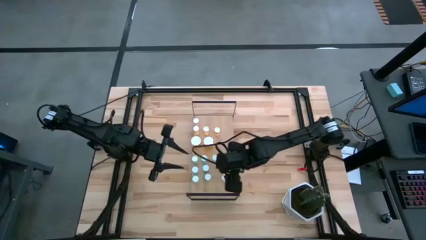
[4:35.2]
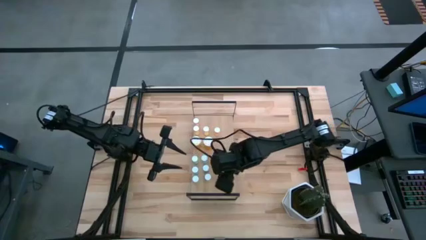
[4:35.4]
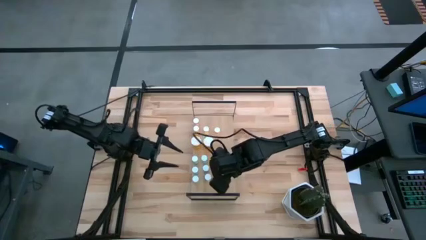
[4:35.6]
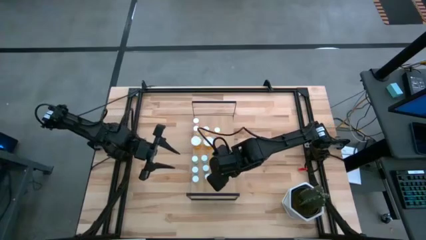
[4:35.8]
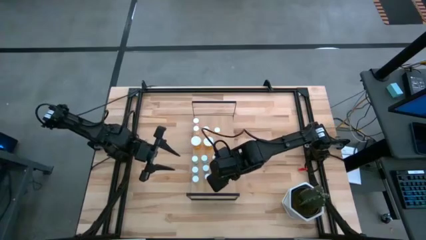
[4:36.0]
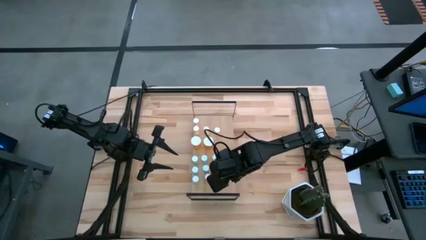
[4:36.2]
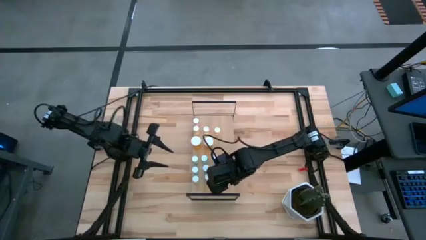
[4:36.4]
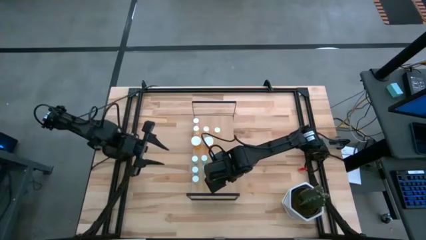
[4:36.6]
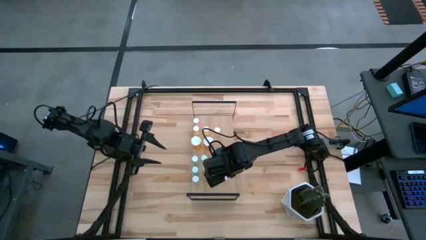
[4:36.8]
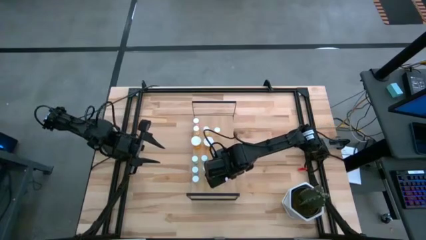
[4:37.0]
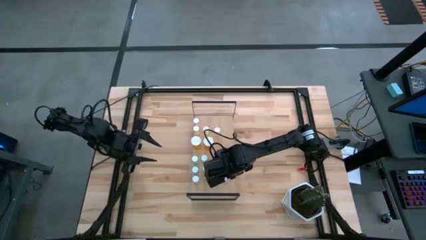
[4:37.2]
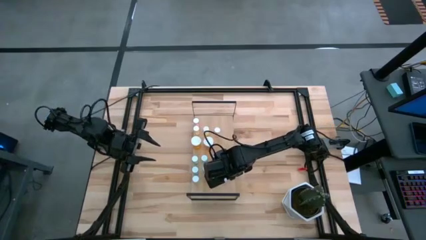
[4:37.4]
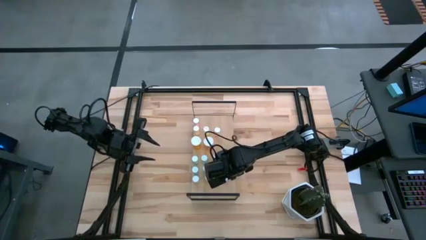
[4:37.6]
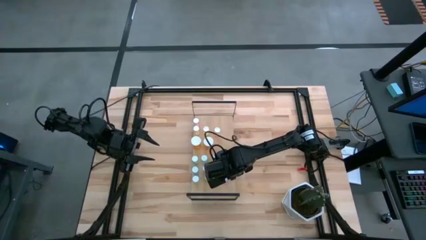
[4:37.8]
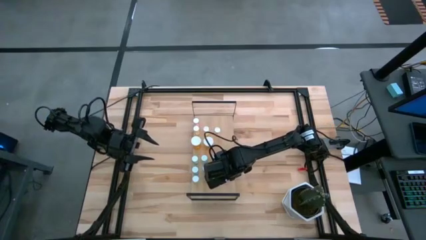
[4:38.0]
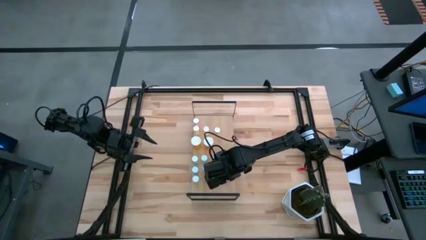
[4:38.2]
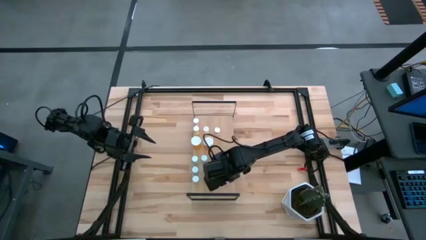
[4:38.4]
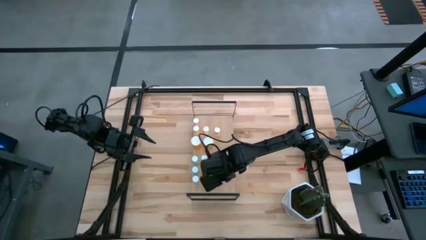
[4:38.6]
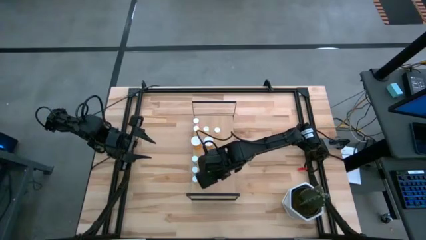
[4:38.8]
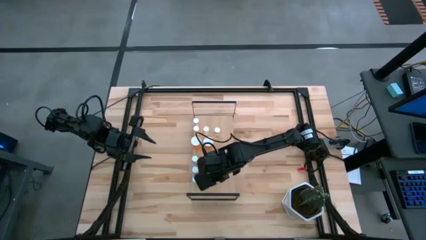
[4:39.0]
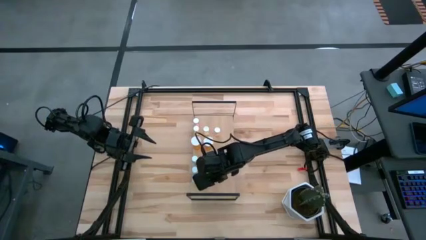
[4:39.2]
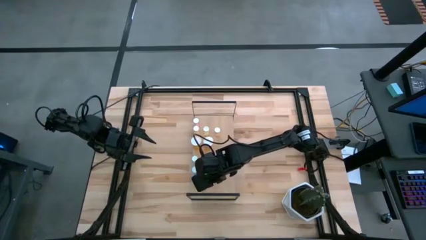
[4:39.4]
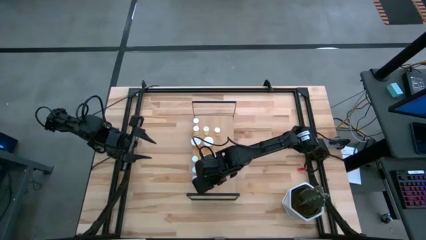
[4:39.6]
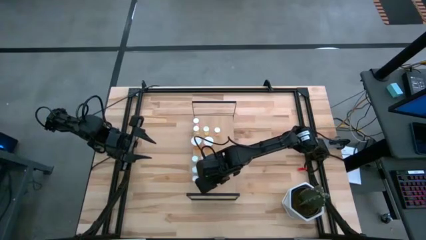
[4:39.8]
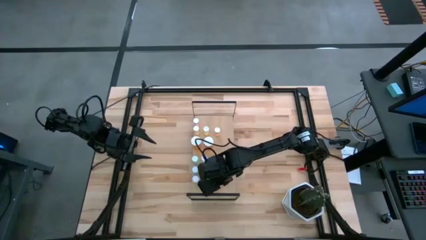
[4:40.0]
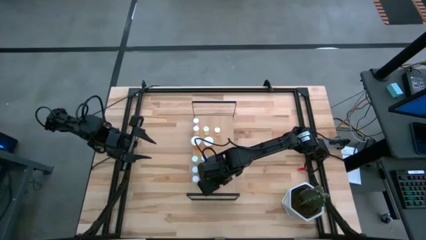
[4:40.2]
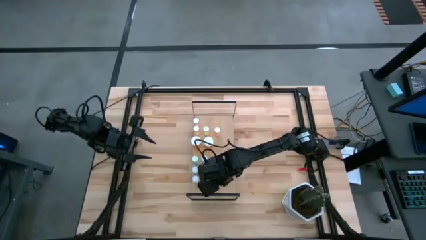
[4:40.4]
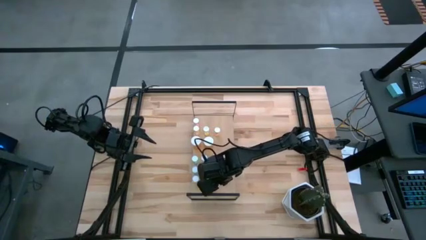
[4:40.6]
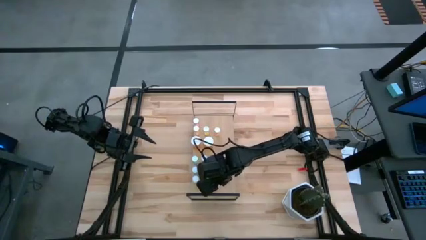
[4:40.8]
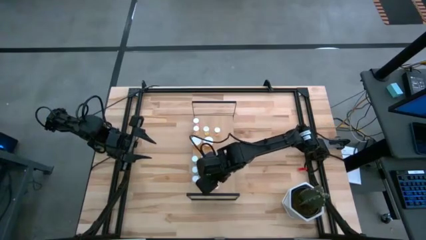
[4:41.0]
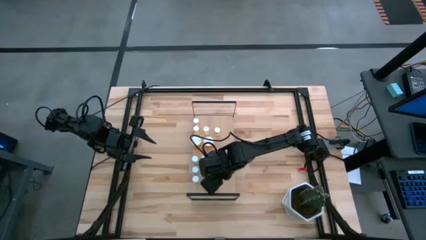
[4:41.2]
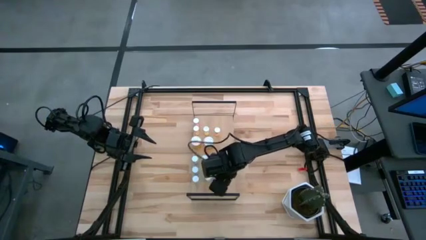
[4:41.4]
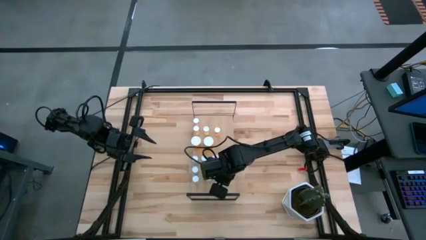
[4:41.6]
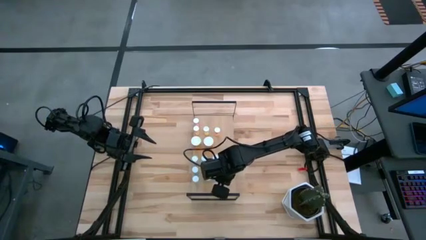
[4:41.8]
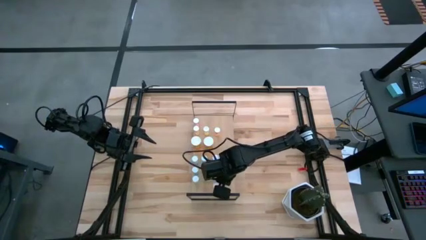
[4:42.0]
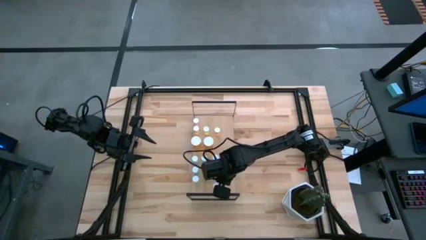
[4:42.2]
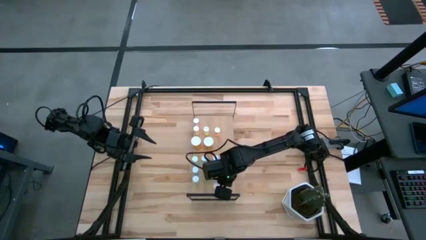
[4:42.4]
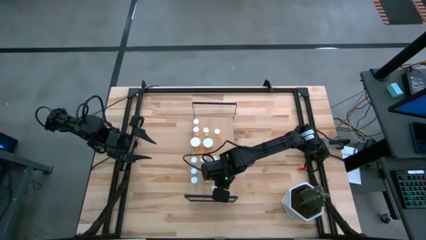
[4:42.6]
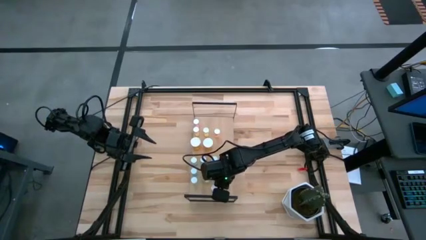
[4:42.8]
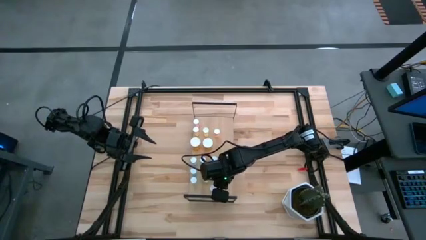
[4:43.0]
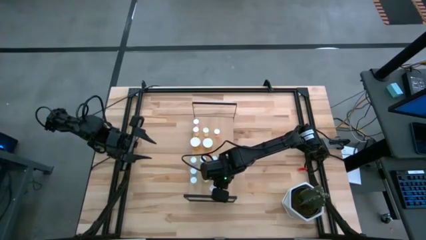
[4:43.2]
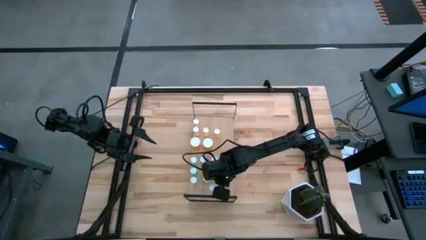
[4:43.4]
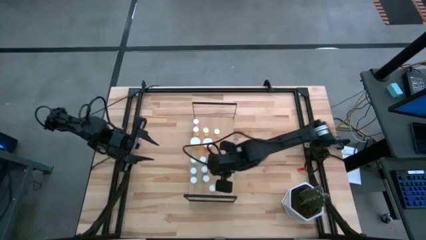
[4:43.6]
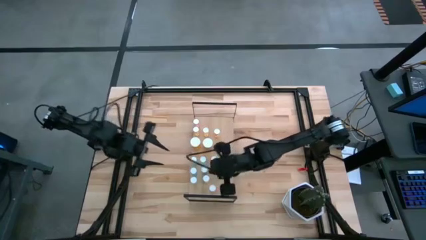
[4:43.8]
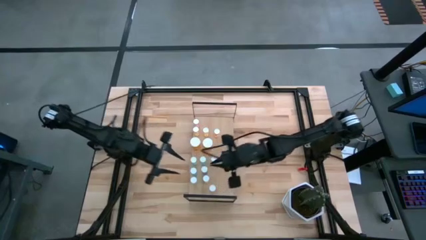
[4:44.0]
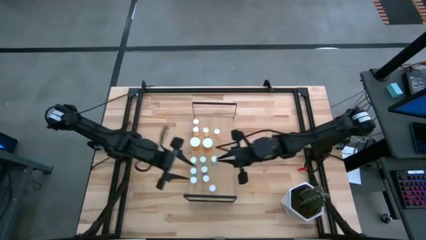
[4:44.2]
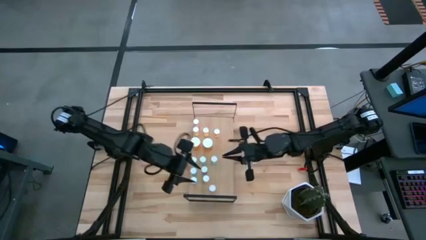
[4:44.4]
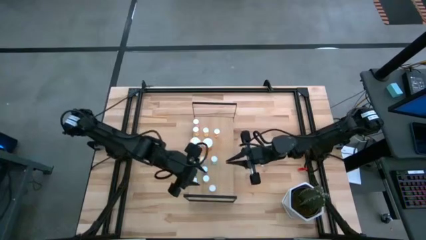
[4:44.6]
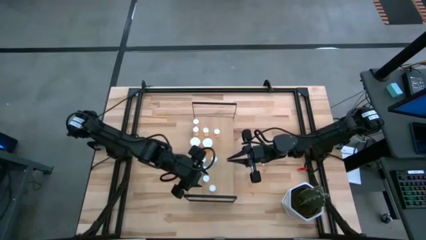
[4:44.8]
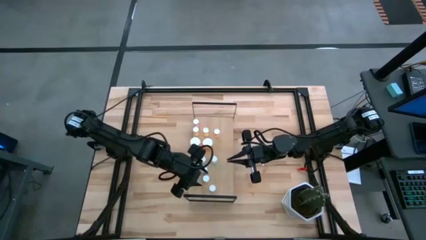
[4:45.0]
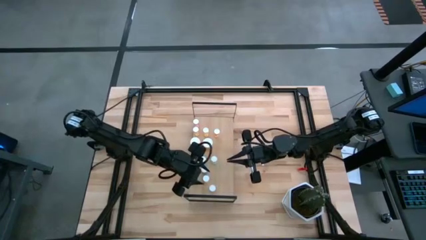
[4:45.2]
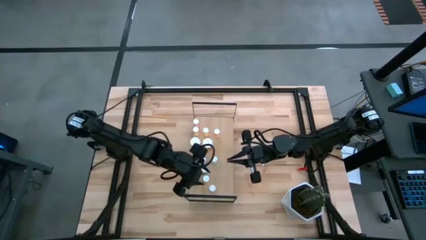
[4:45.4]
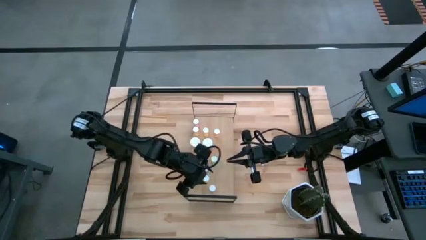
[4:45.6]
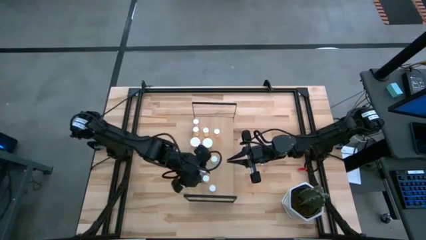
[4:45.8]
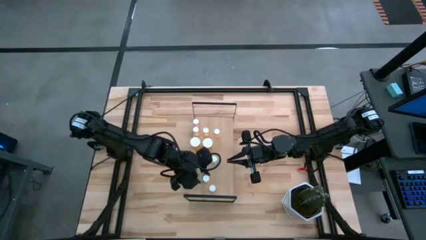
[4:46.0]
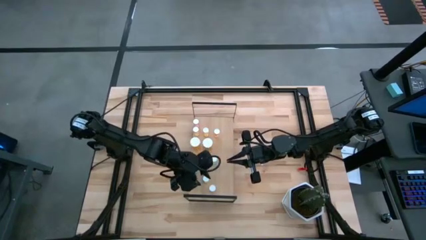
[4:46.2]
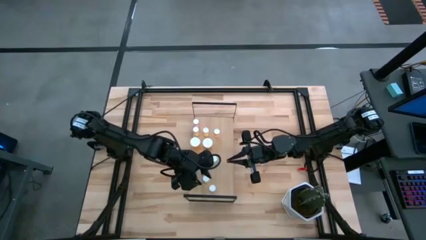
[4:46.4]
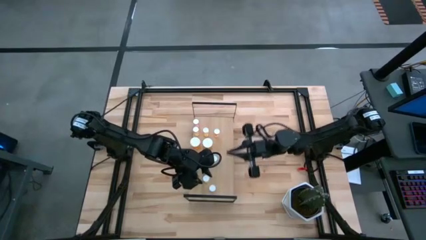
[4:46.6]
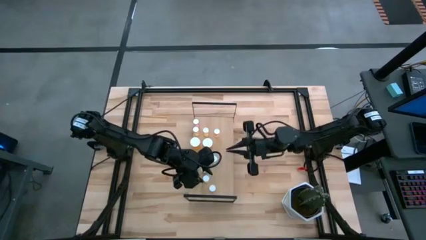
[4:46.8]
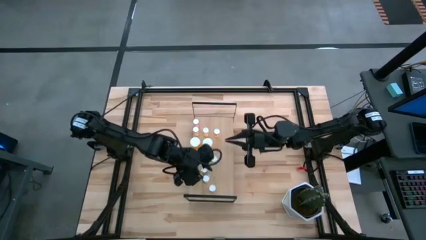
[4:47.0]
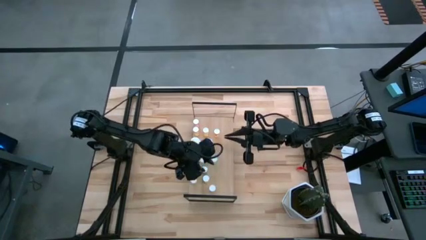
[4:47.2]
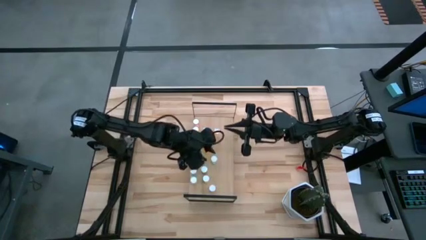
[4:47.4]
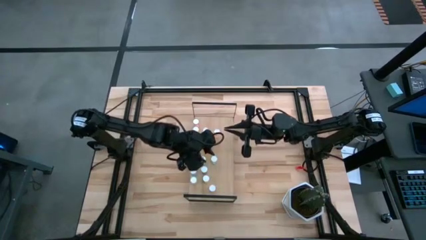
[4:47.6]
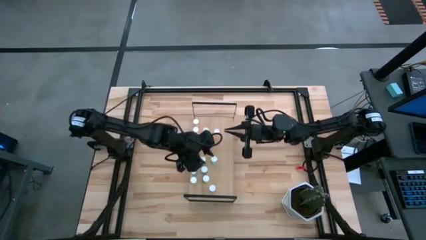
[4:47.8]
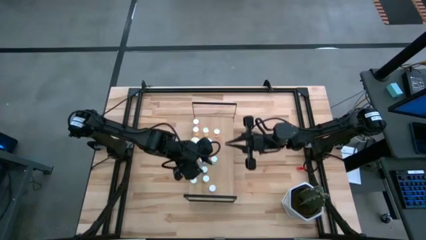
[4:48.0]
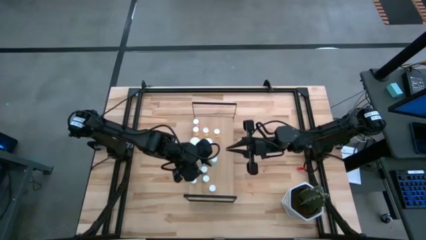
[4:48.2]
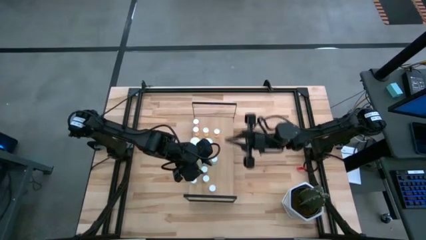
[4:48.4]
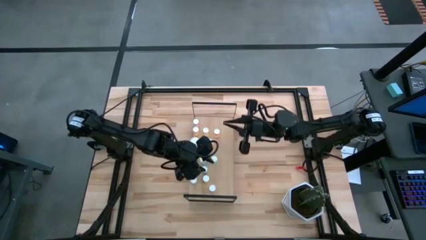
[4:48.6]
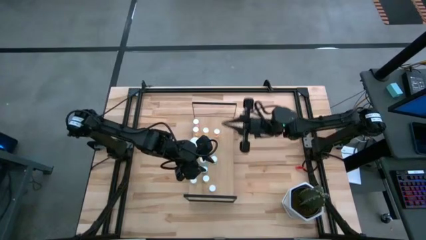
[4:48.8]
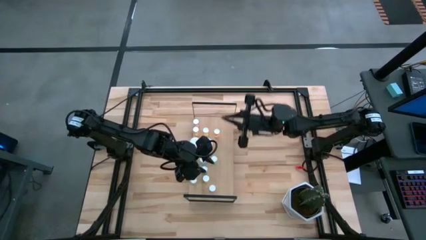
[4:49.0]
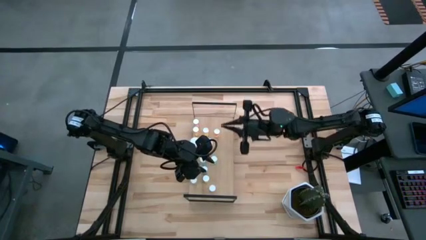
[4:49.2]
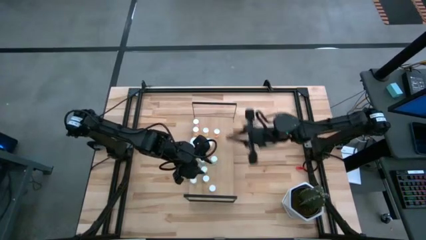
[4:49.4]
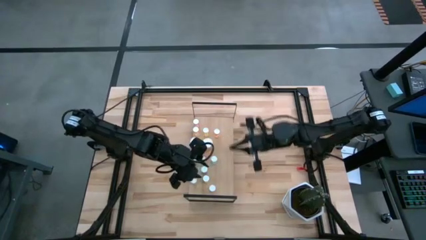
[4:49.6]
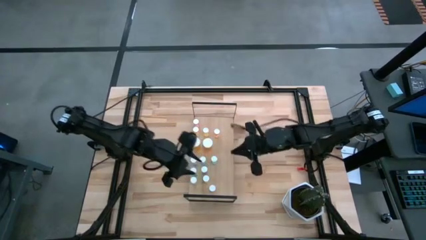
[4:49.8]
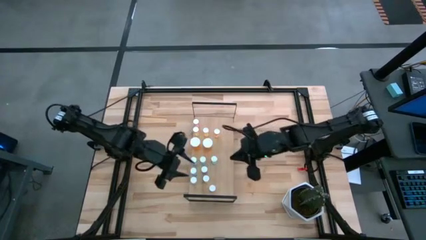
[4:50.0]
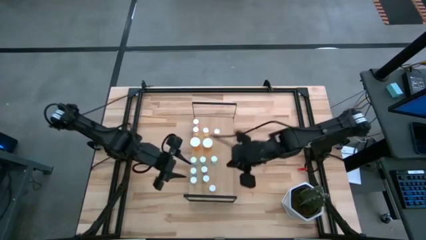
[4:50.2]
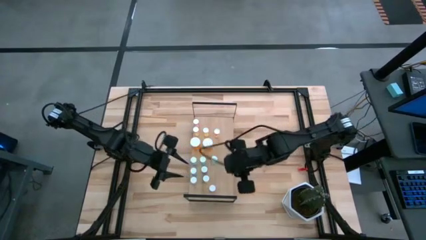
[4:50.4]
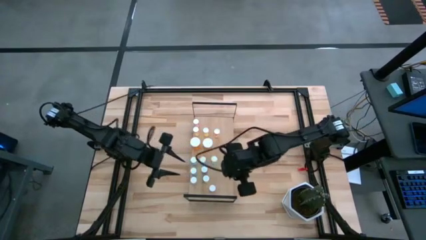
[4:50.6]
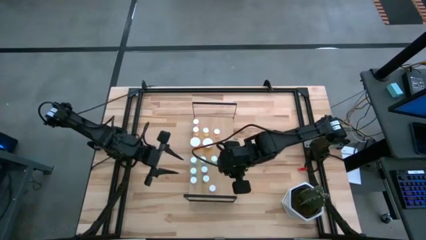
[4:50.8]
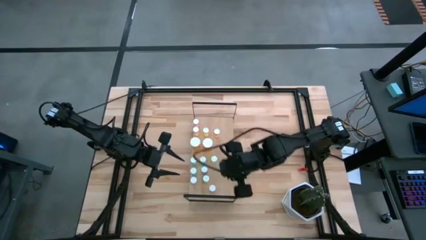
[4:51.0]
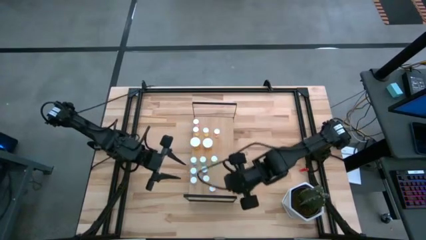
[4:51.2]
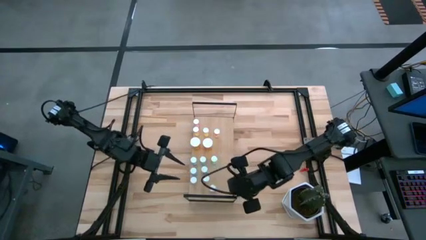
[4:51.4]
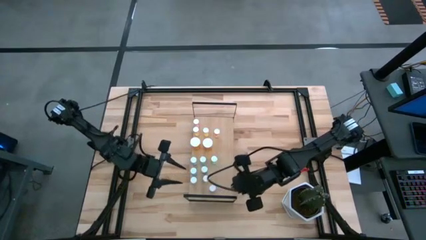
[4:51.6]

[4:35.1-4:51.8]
Task: Pick and place medicine bottles onto shelf by color
Adjust the pill bottles on the shelf
